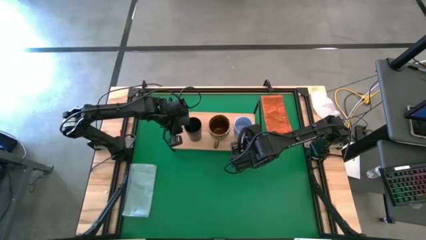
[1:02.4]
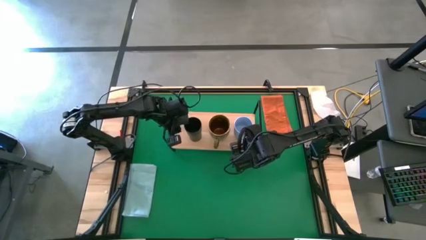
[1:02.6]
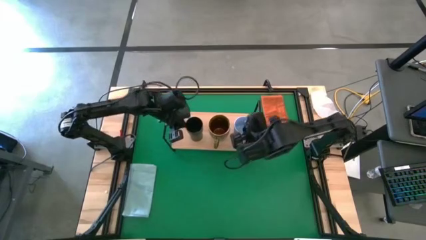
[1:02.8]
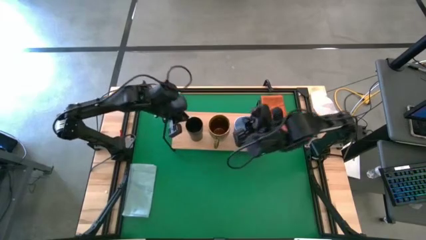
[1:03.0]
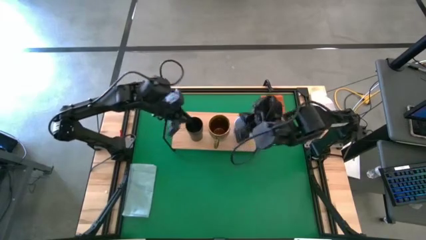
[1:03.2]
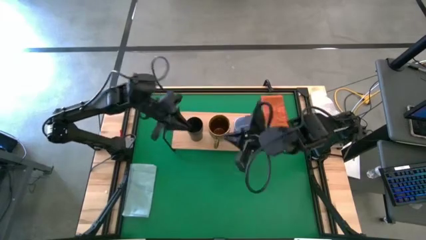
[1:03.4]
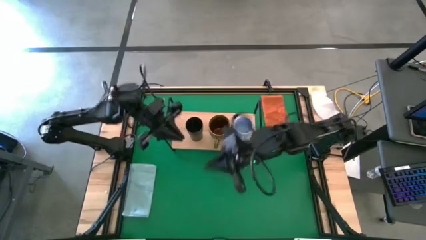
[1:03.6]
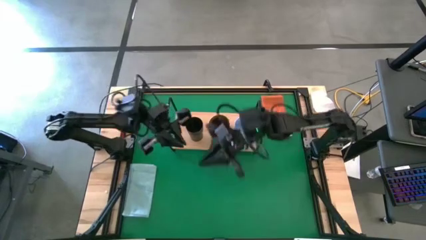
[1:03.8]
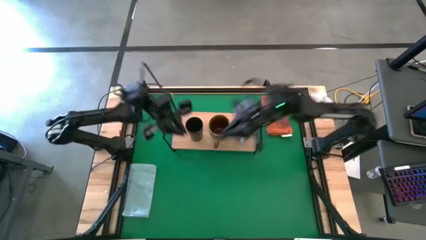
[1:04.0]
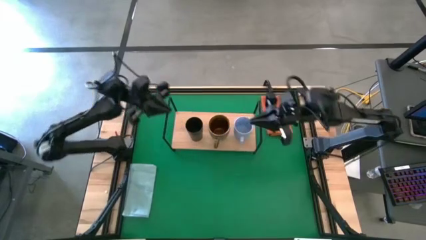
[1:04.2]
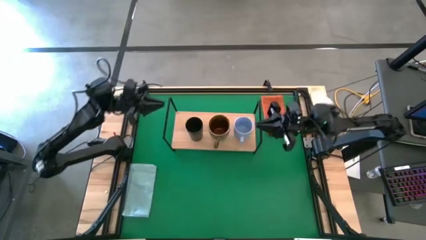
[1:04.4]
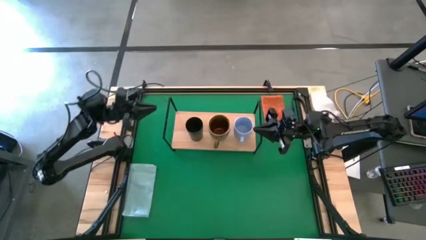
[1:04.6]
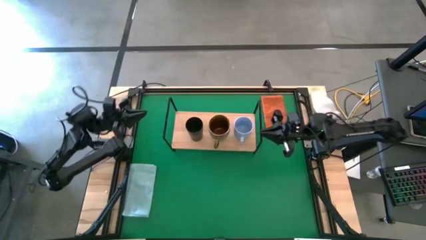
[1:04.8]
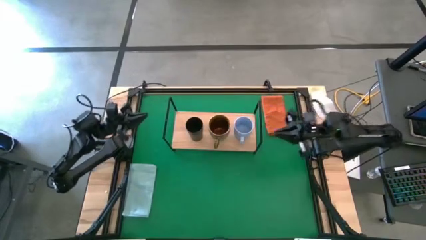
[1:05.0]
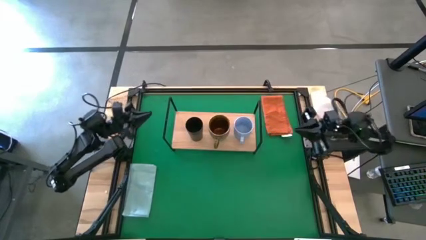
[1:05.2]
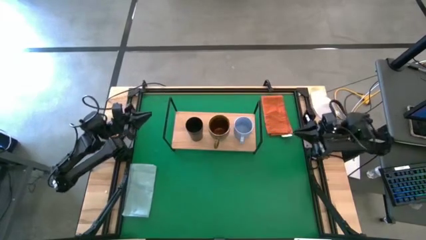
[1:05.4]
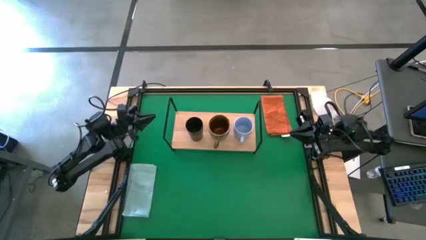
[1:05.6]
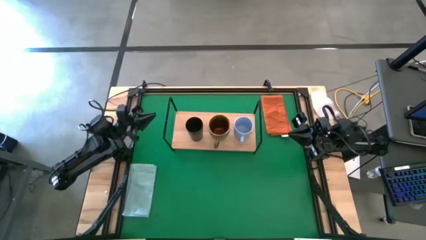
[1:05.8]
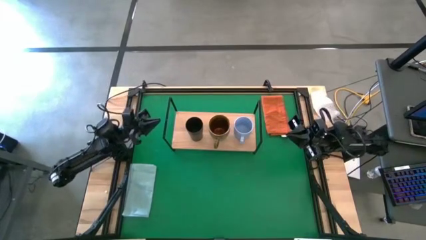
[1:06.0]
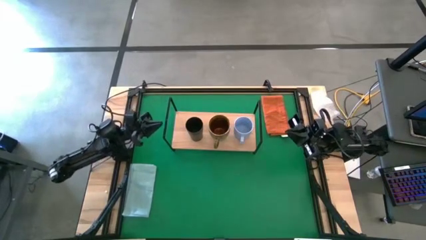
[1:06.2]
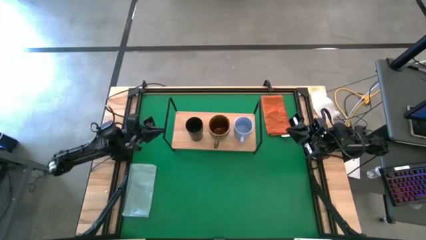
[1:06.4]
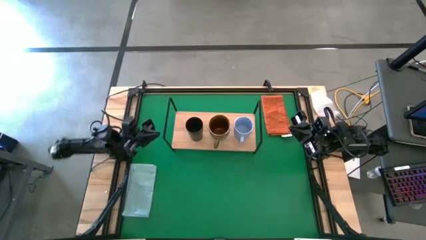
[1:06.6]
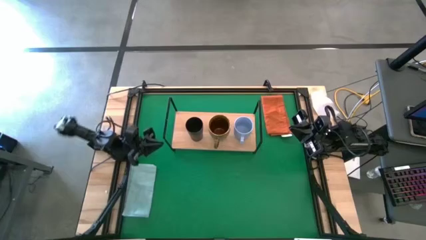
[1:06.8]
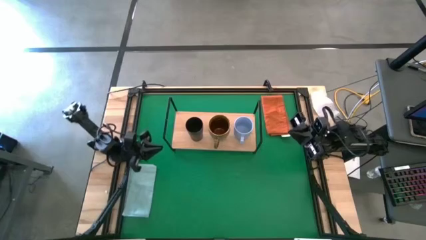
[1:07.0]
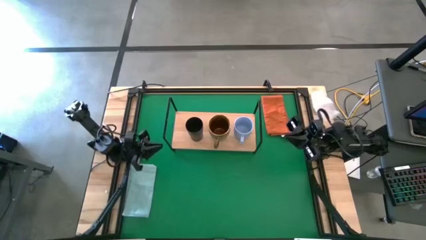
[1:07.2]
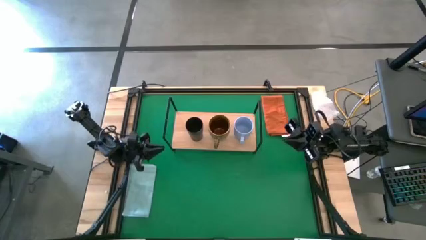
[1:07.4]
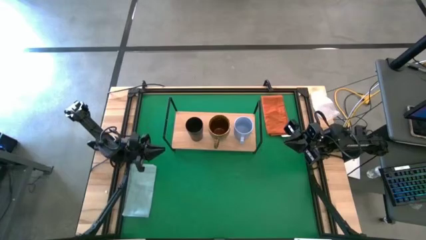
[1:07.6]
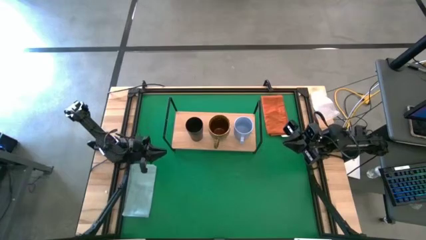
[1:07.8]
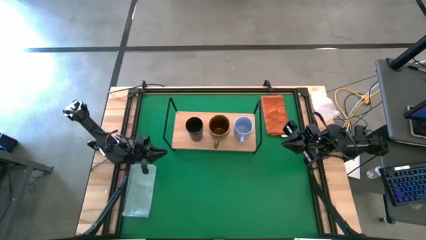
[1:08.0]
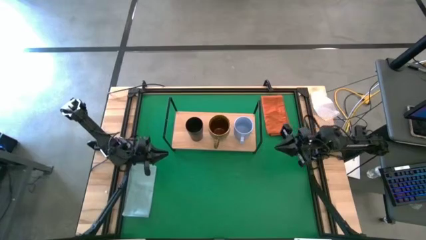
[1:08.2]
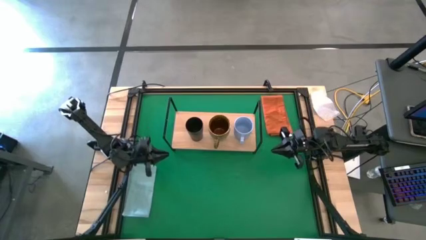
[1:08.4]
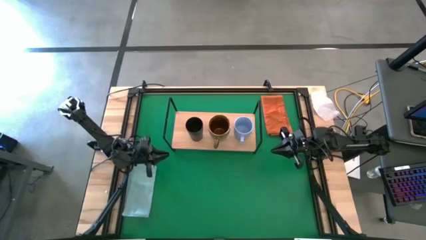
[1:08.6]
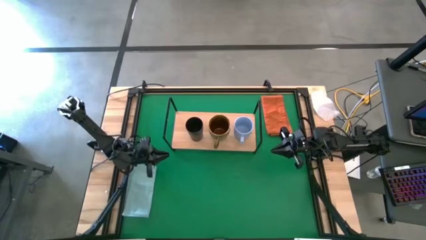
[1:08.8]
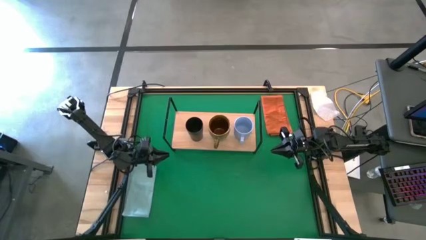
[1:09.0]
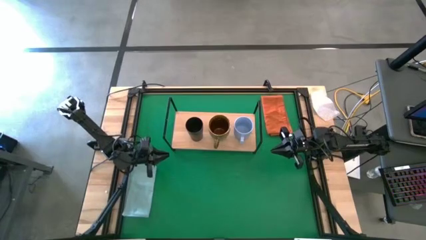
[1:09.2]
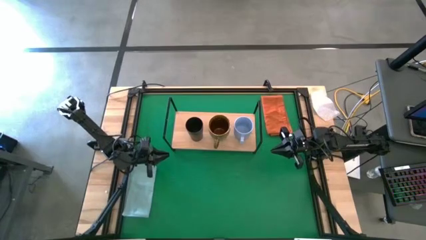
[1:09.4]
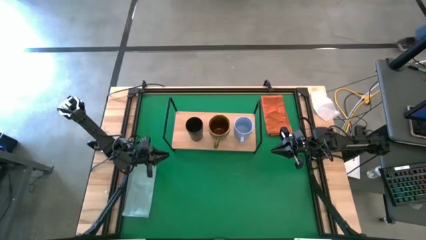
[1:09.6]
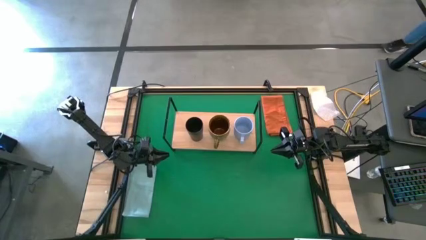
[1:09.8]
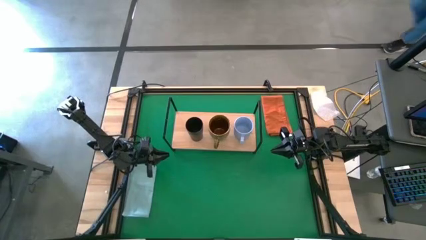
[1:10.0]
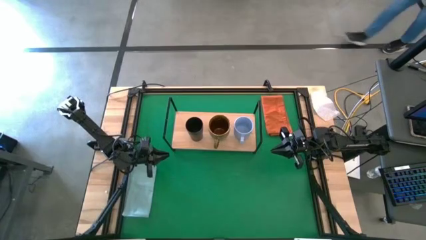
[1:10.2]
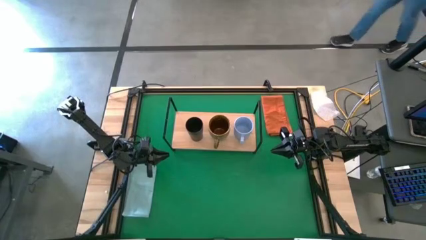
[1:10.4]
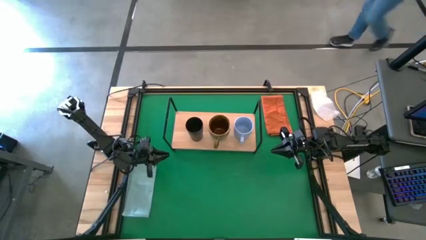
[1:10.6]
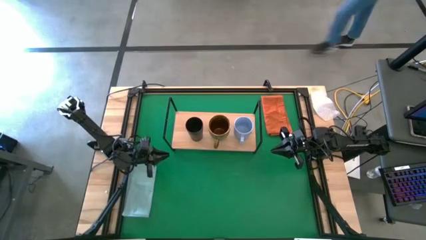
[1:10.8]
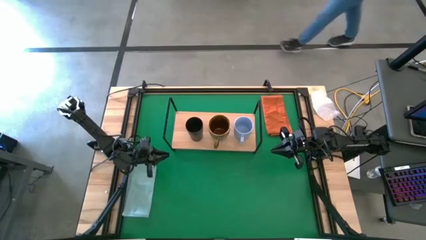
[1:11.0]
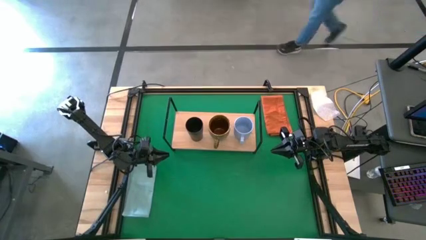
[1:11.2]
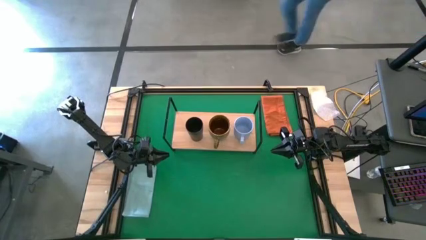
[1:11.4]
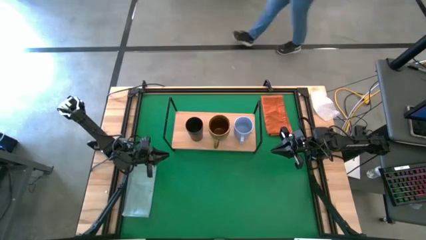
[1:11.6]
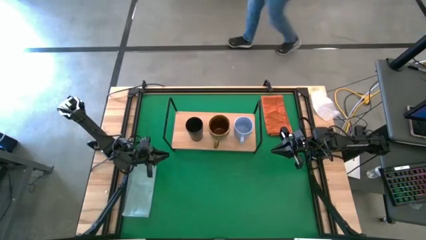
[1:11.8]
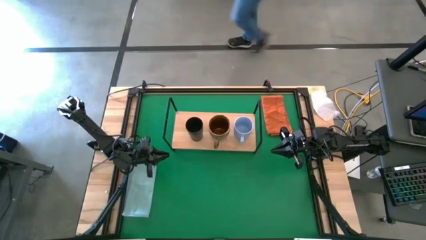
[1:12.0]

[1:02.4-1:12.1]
Task: Stack small to large cups/mugs on shelf
Return to Home Position

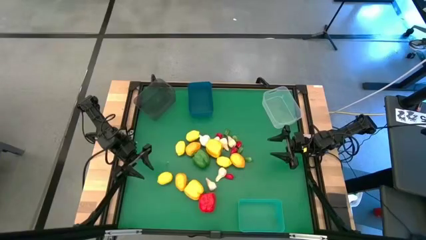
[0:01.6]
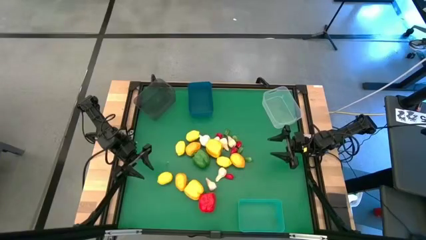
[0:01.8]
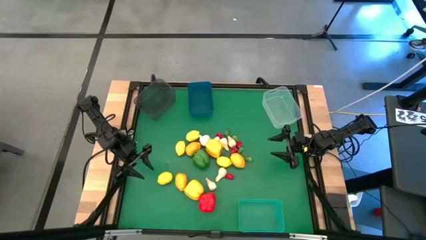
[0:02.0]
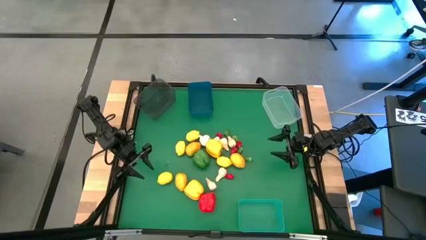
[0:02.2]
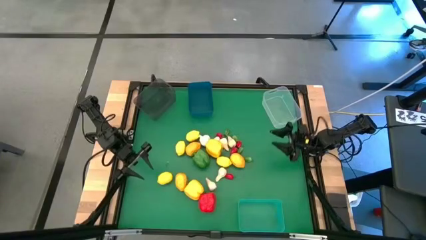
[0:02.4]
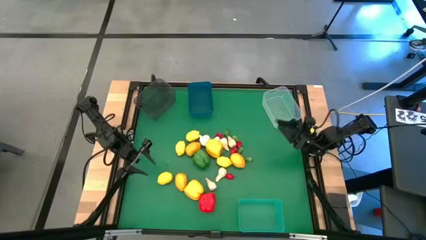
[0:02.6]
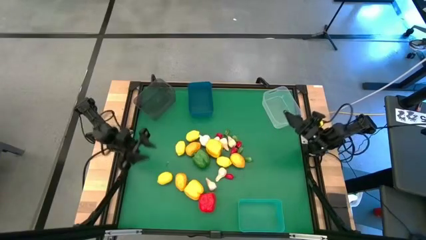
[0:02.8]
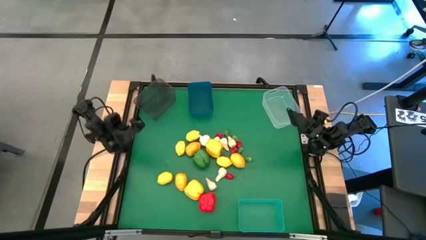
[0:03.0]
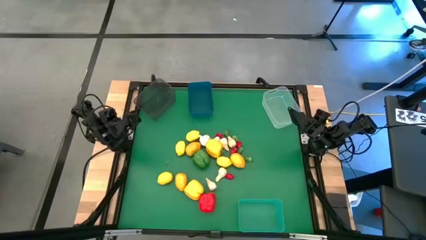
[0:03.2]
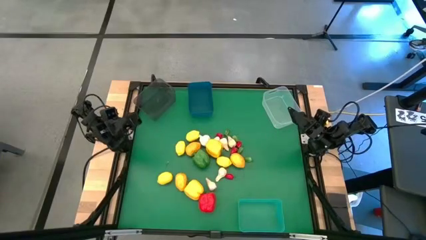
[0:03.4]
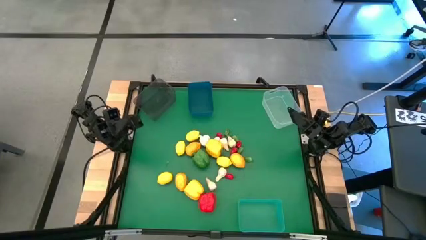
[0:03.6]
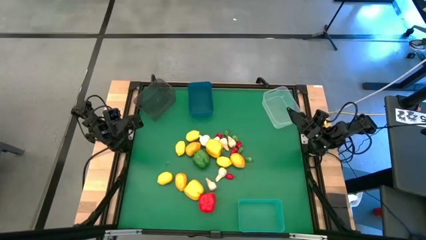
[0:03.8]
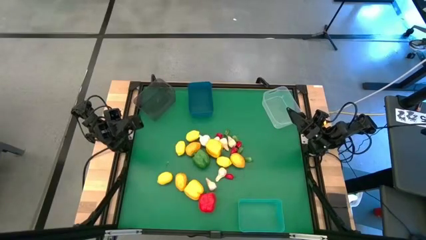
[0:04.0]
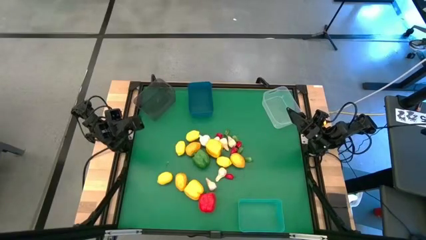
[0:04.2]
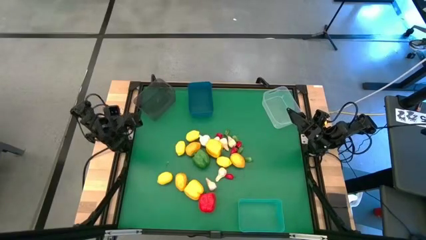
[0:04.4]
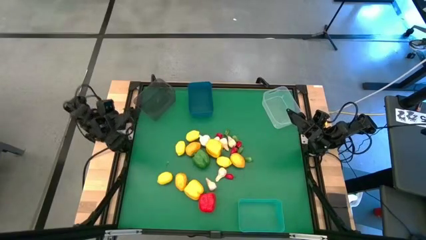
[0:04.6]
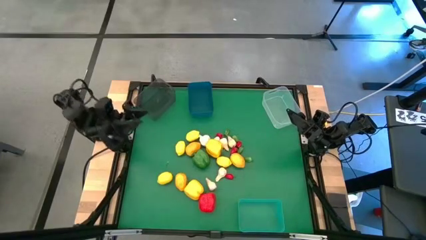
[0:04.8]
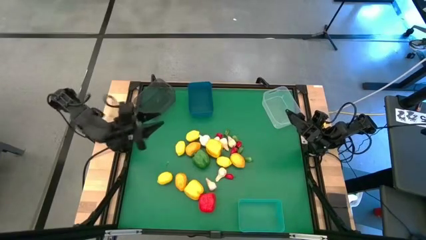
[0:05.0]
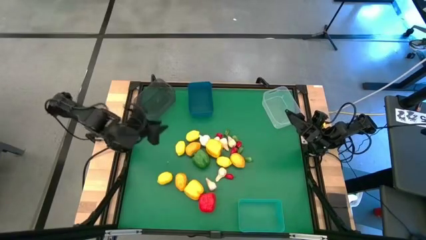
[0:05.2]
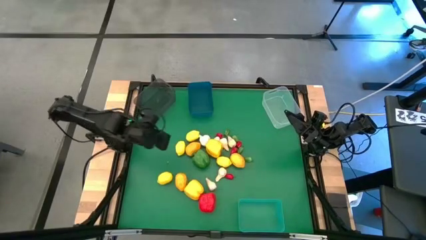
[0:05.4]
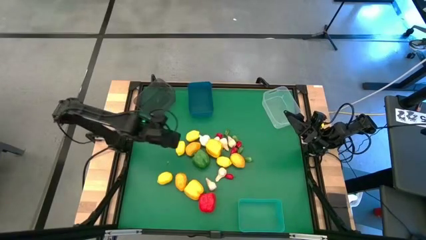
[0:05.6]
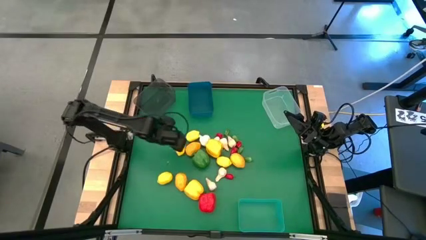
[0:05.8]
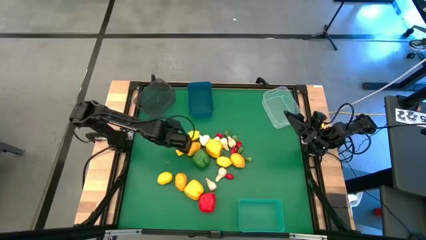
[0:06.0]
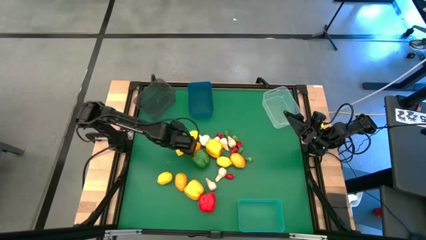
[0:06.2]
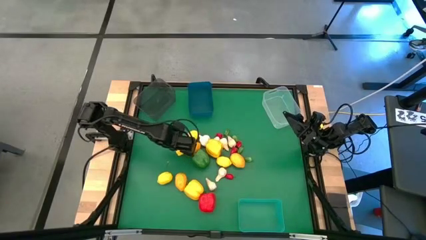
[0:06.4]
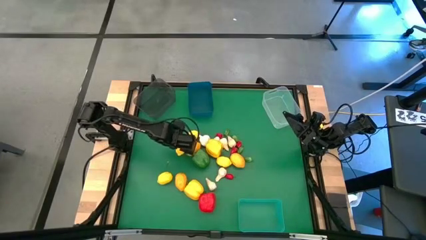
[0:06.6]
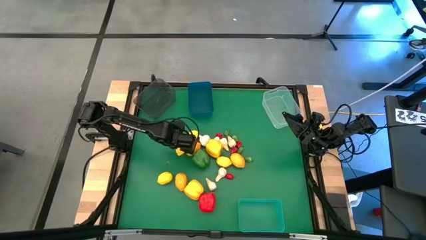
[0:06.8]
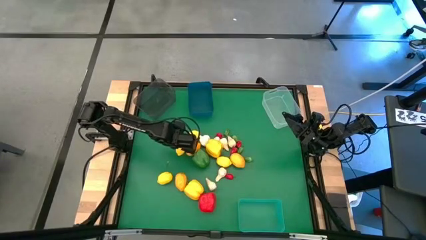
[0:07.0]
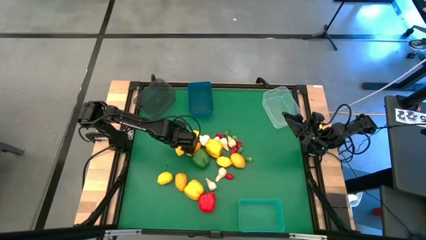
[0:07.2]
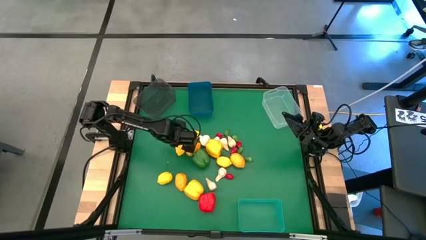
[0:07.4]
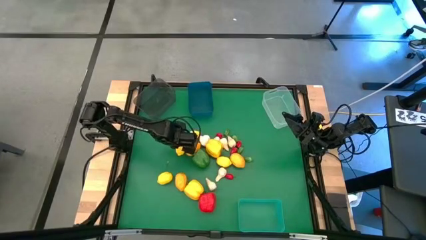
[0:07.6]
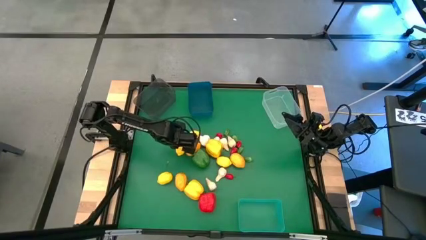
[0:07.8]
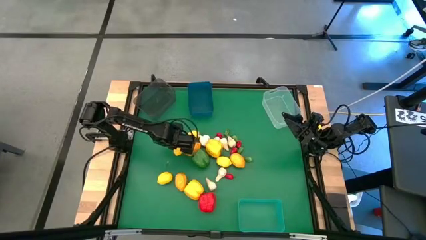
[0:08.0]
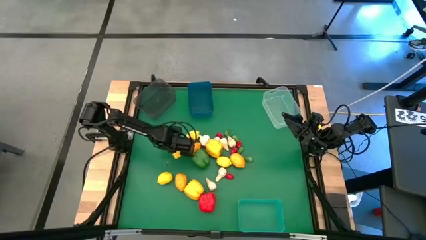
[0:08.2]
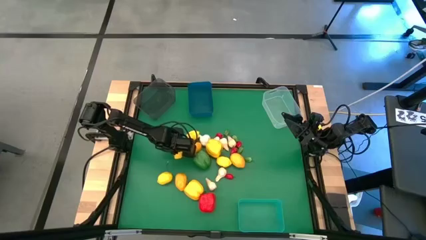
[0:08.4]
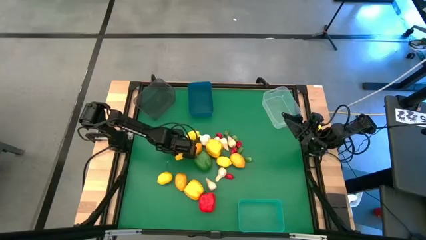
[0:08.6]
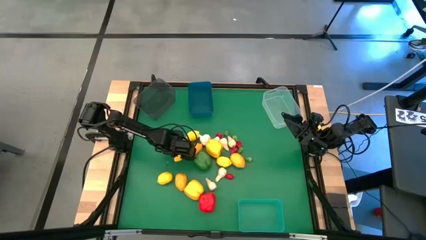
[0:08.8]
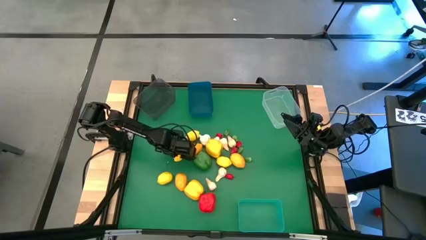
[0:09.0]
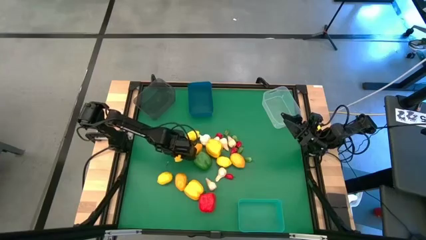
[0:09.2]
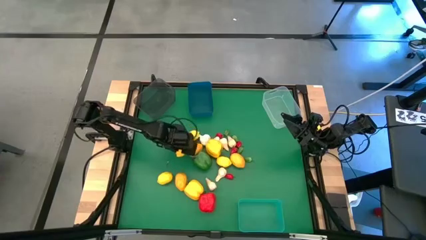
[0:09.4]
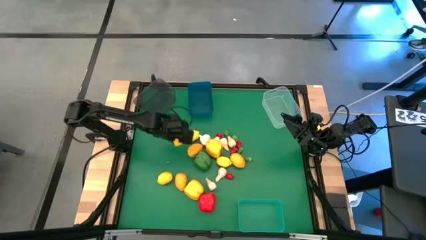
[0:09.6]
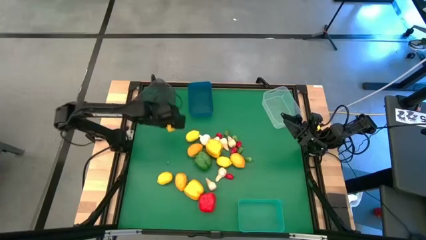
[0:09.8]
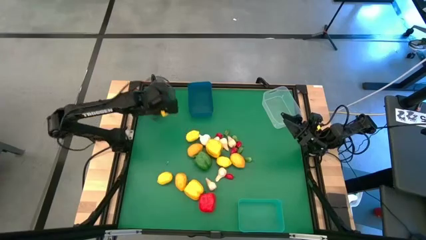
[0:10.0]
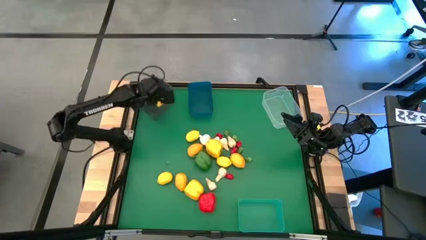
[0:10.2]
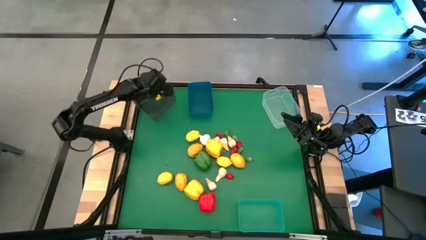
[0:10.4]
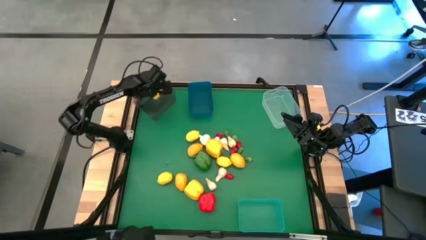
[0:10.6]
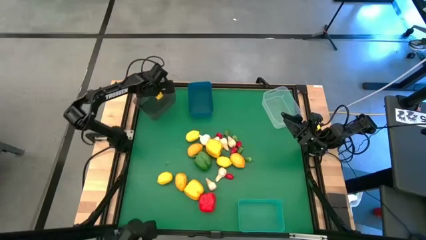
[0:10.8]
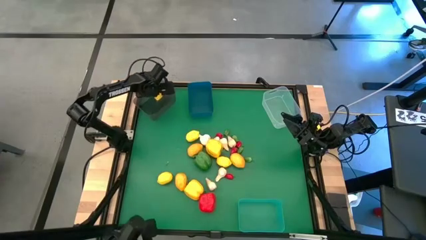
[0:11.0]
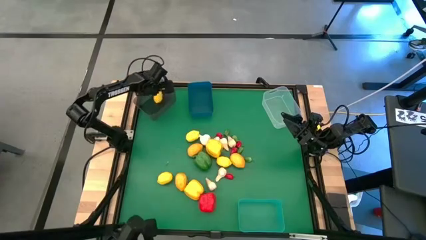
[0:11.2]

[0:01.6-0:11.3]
Task: Sort produce into baskets
Put the top left yellow lemon into the black bin
